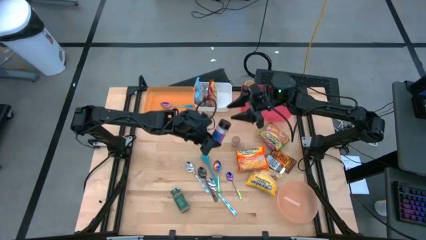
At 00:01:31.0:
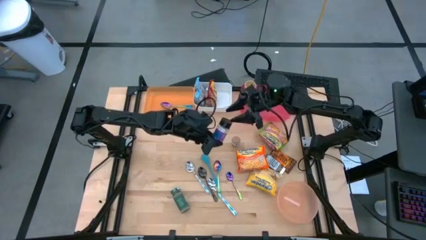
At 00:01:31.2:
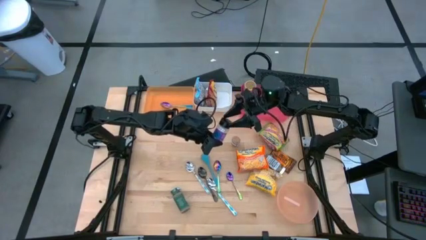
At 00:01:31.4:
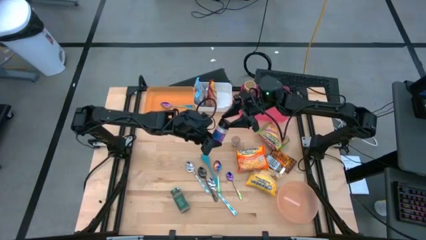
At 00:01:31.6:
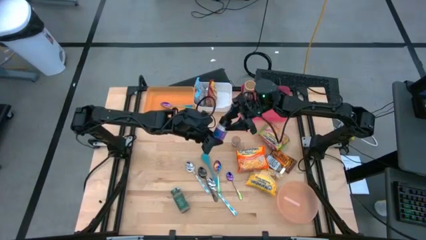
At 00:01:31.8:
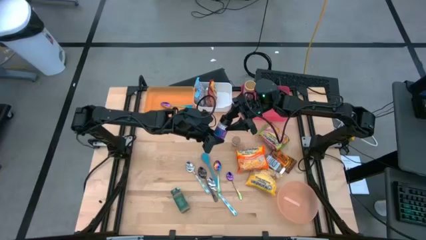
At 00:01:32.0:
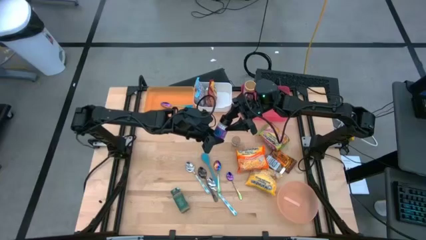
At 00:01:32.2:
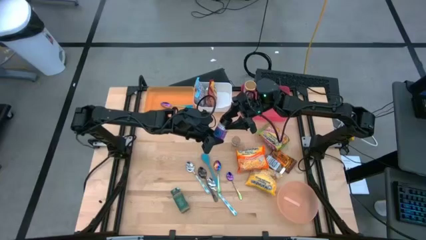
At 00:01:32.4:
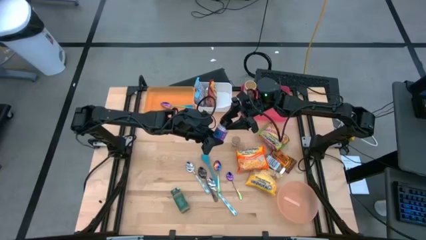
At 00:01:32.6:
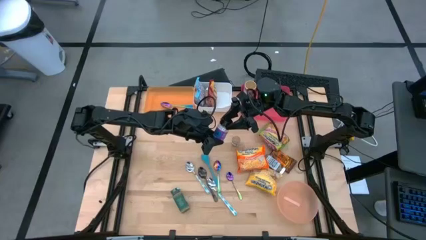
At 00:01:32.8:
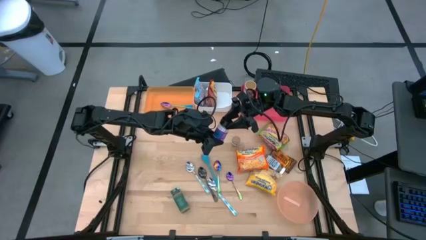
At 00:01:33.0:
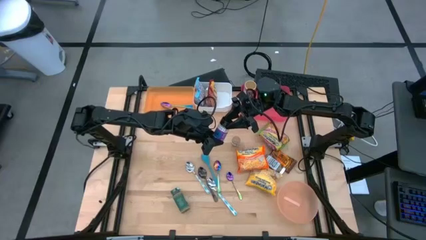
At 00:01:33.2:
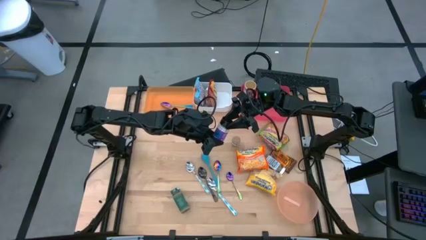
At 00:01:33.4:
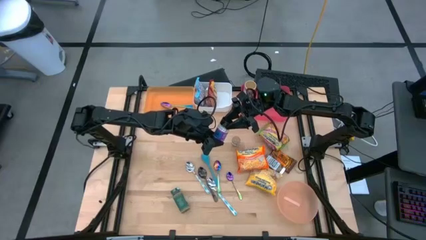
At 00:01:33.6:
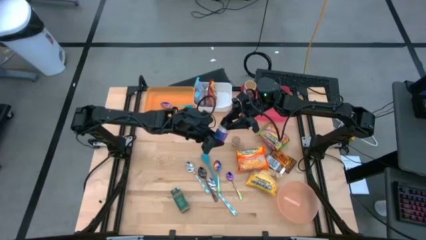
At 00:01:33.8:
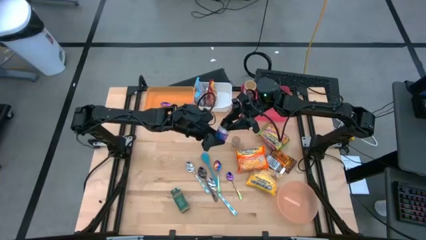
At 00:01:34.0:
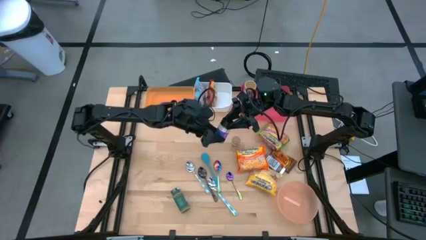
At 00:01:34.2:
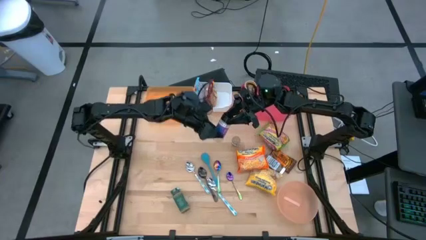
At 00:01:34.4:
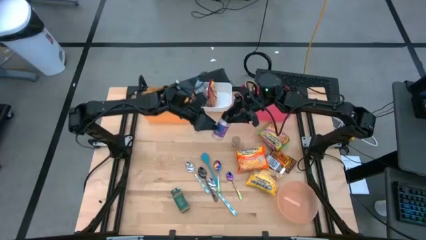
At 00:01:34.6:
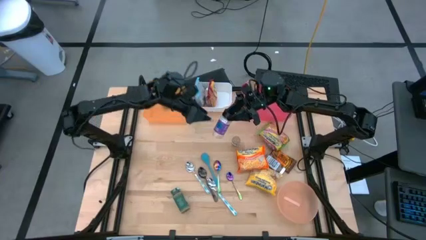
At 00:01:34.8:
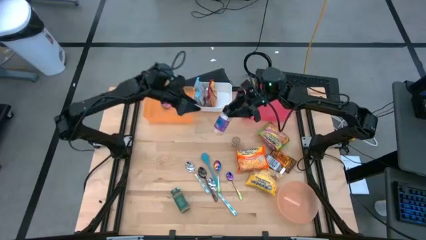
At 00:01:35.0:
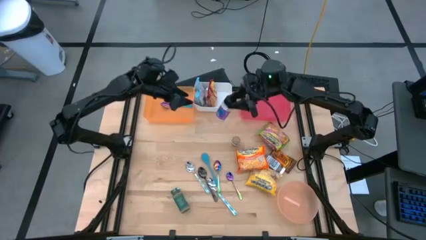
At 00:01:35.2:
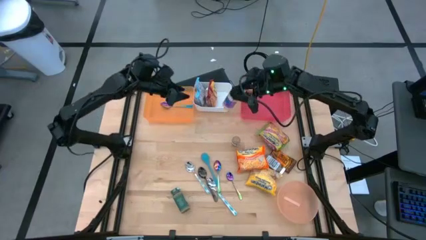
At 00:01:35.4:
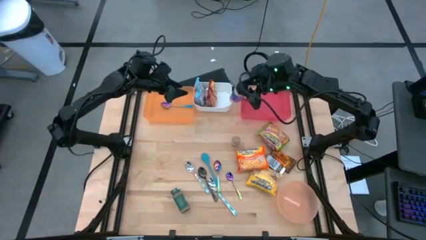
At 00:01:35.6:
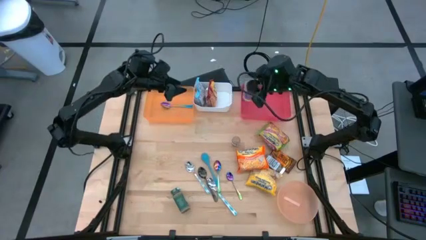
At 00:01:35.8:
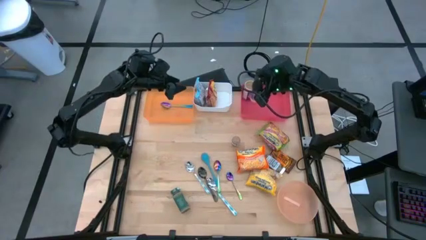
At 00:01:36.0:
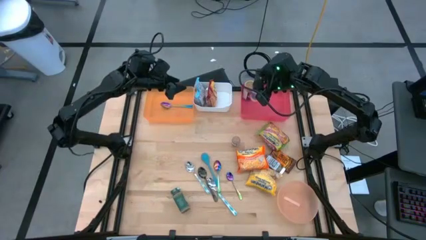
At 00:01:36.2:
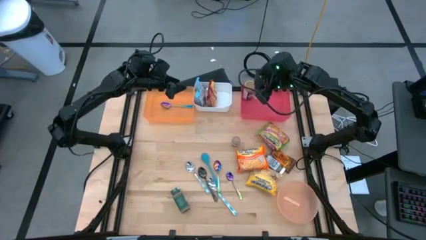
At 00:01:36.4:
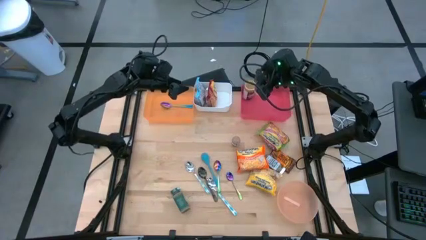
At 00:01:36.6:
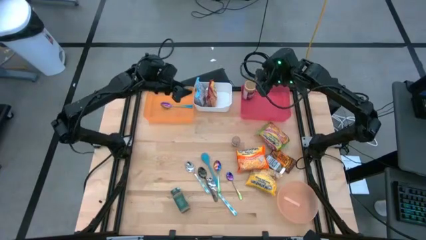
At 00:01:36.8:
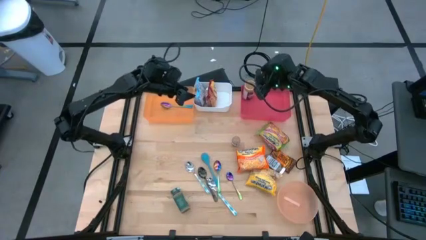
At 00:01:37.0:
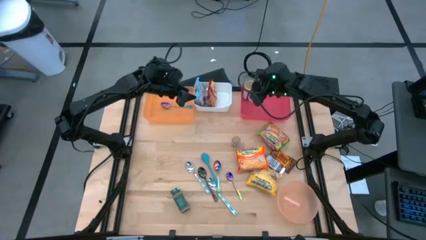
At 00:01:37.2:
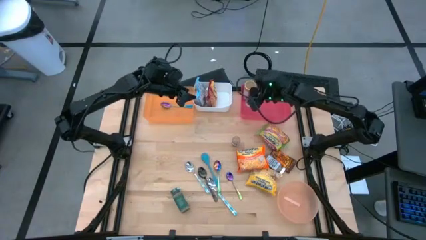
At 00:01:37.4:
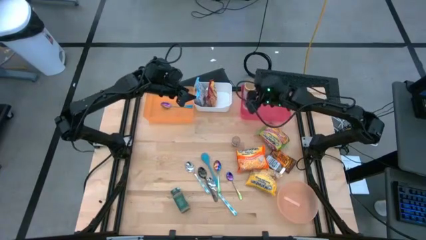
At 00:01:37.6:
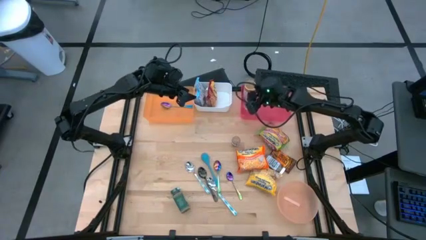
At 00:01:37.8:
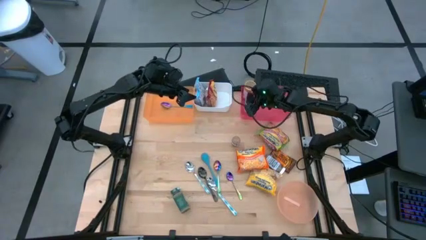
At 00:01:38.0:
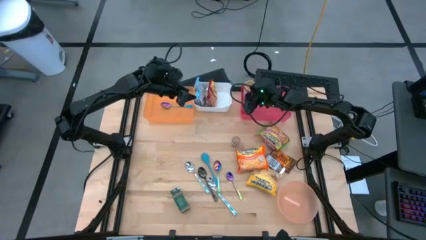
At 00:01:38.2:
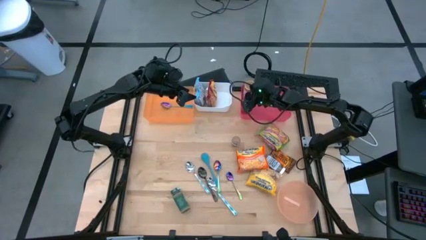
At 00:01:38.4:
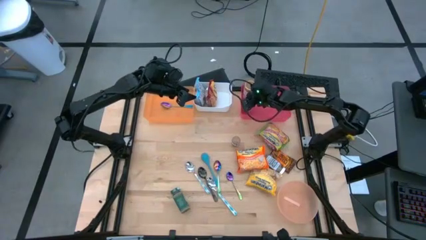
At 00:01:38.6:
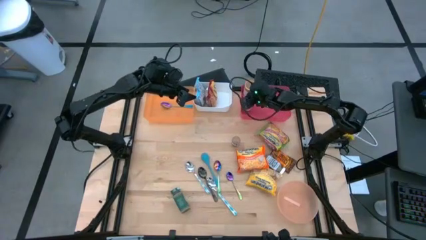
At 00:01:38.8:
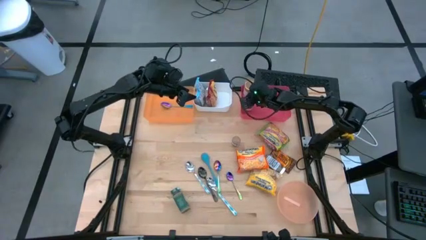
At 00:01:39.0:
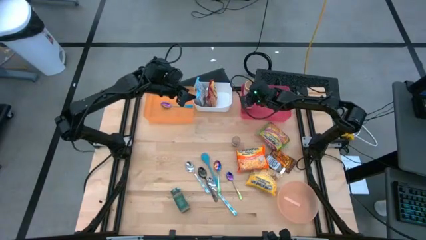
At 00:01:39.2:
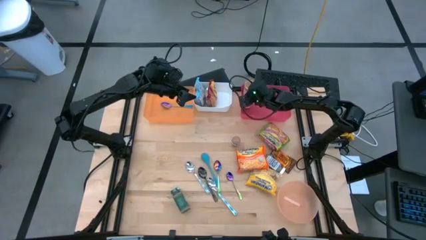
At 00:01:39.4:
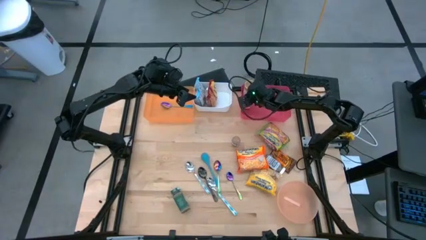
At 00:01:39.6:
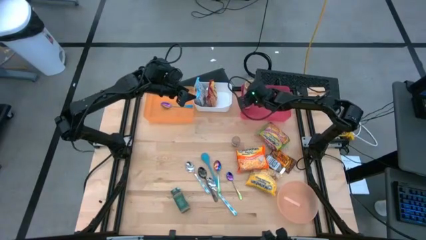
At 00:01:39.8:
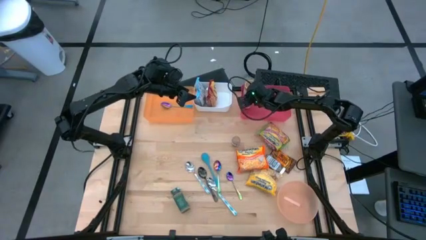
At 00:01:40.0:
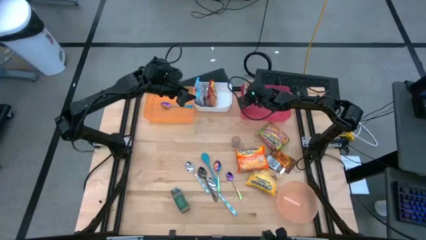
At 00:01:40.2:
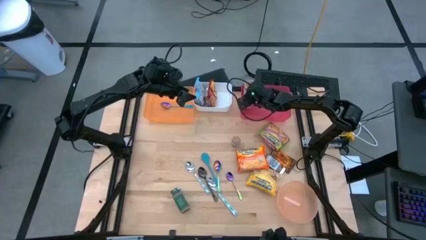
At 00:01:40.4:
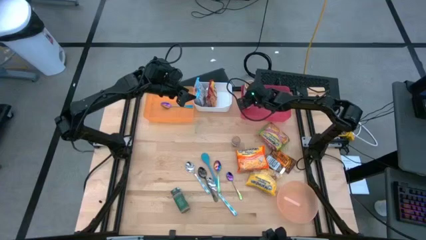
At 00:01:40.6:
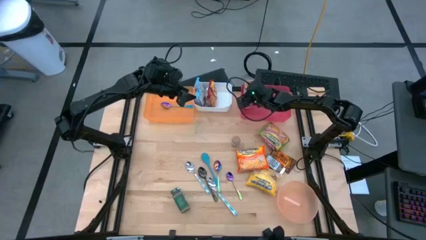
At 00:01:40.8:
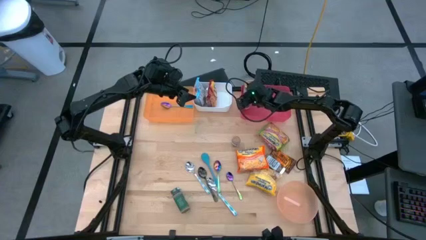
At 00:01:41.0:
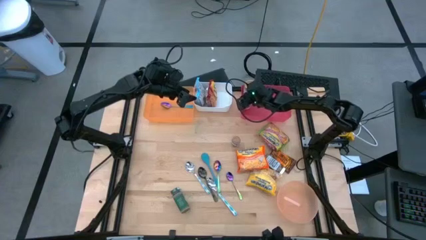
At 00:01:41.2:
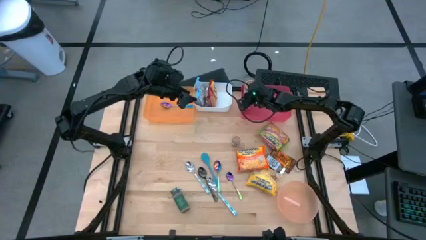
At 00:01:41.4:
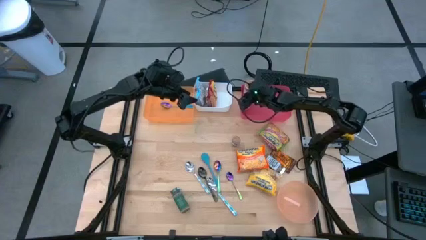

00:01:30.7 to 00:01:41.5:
Task: Pick & Place Food Item
Put the purple spice bottle into the red bin
